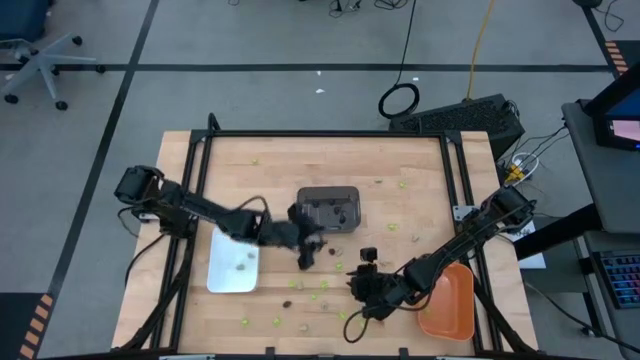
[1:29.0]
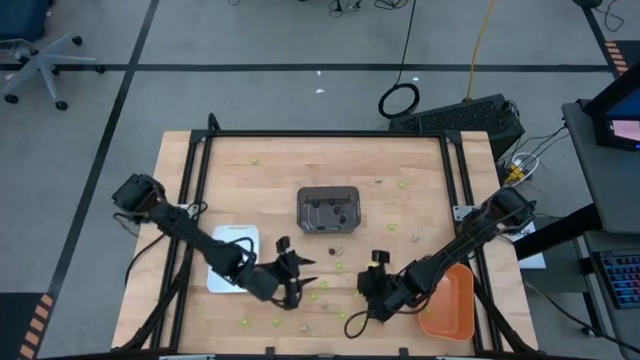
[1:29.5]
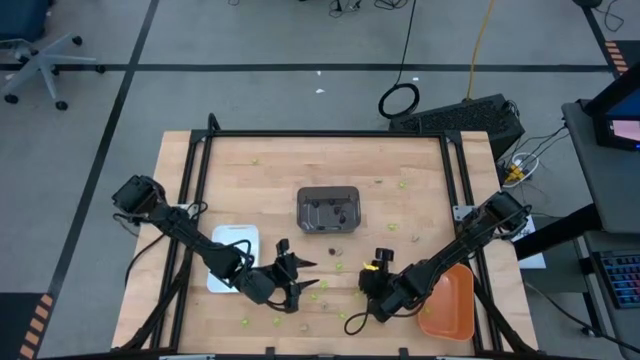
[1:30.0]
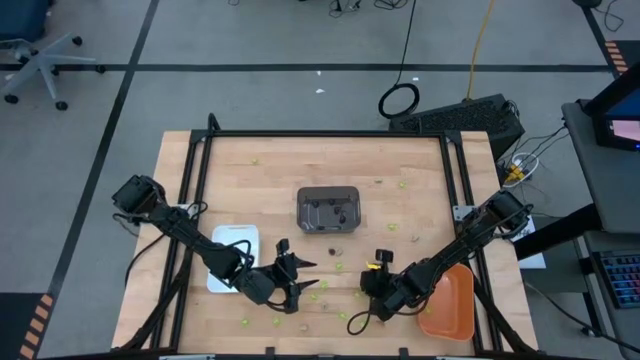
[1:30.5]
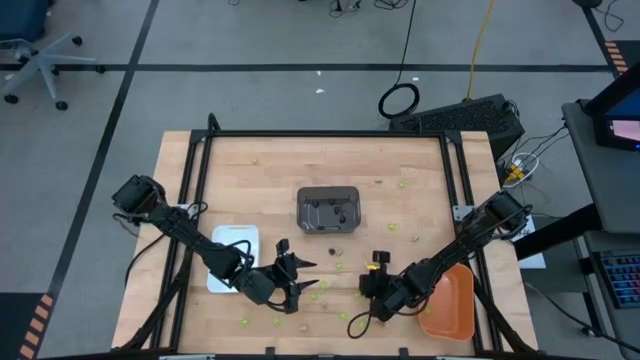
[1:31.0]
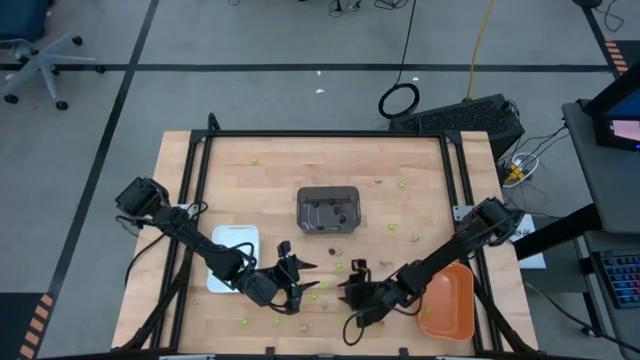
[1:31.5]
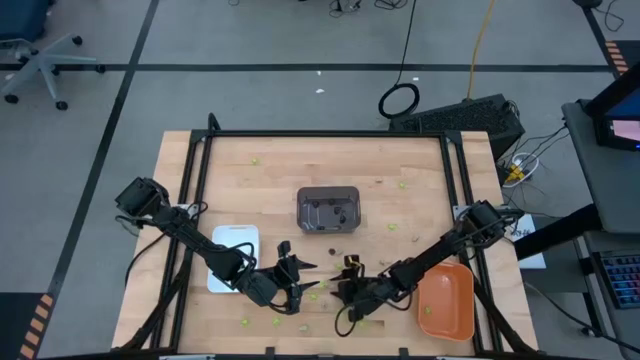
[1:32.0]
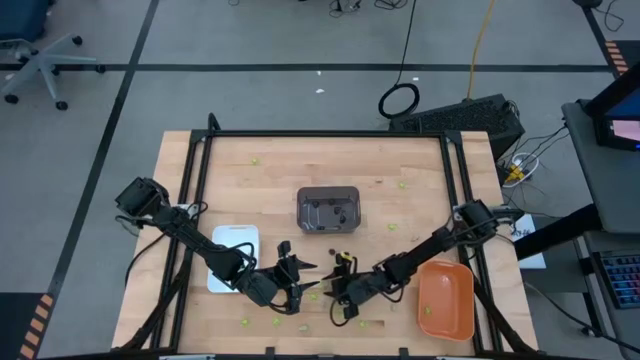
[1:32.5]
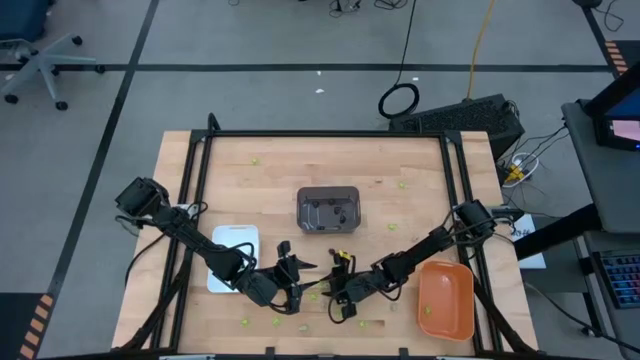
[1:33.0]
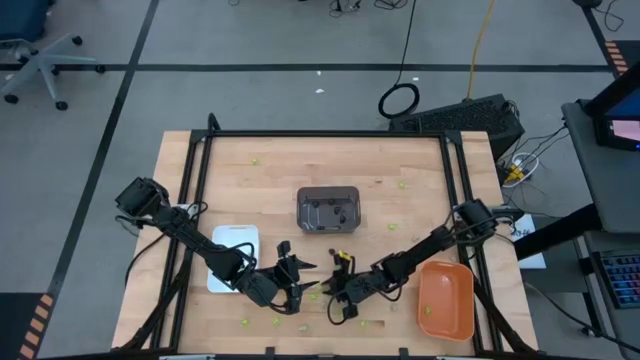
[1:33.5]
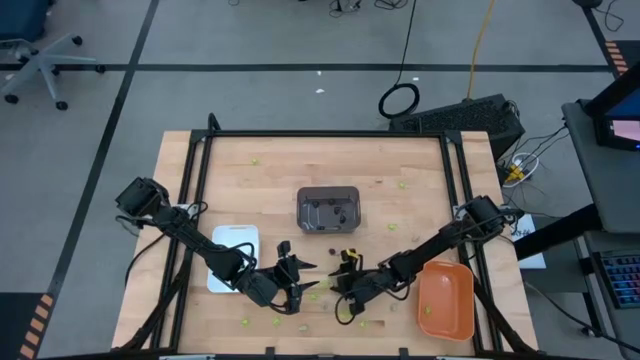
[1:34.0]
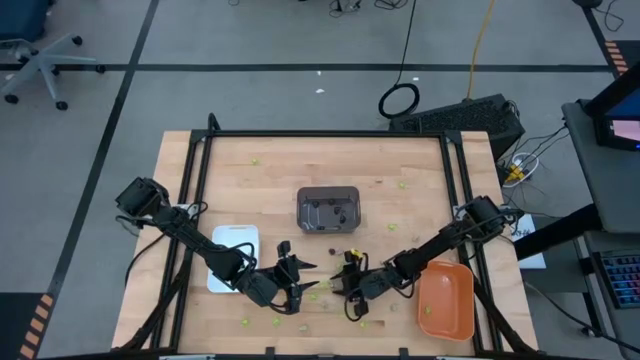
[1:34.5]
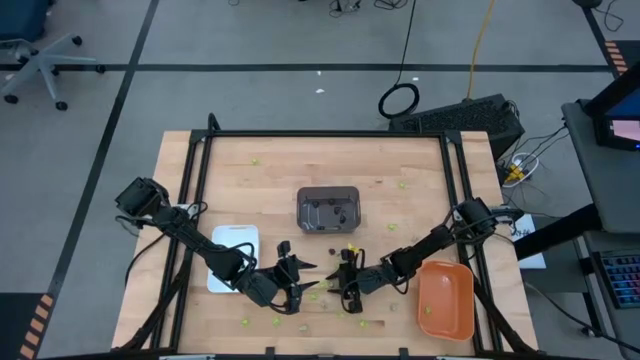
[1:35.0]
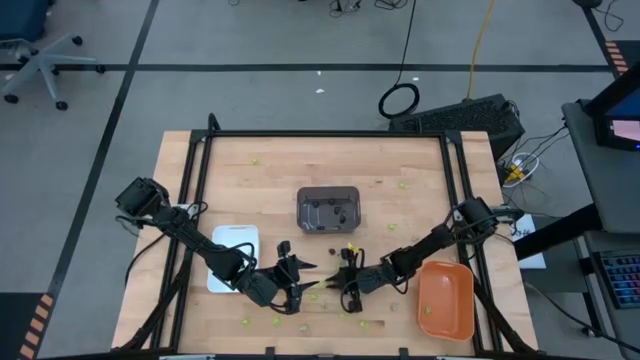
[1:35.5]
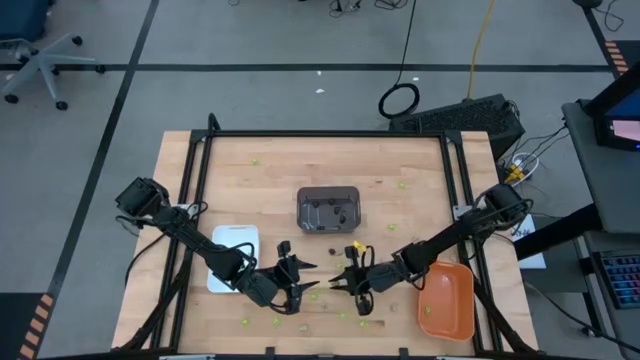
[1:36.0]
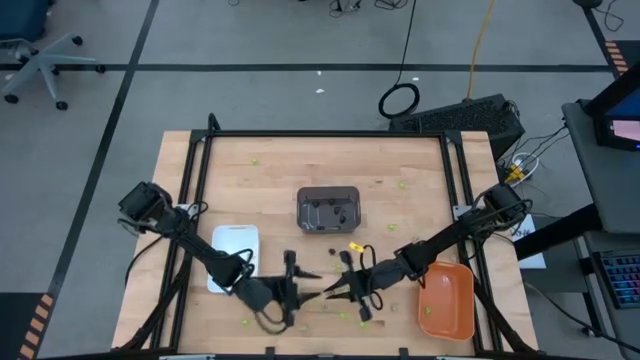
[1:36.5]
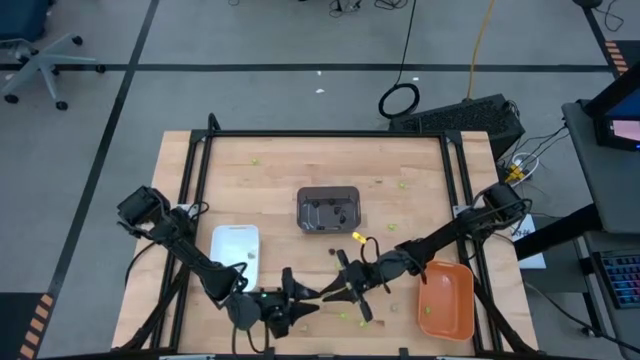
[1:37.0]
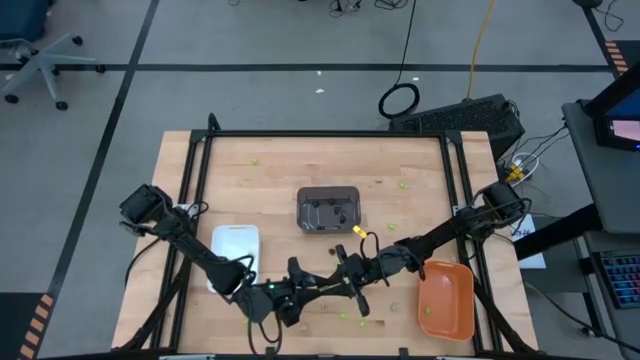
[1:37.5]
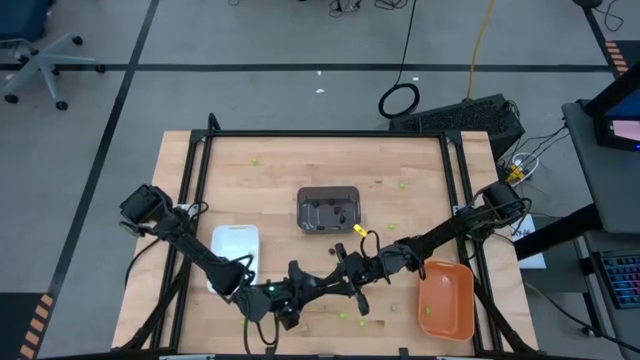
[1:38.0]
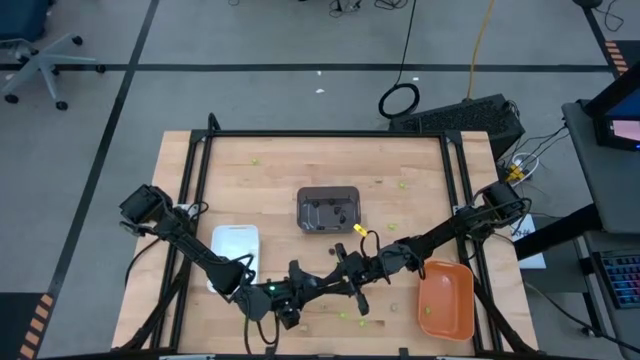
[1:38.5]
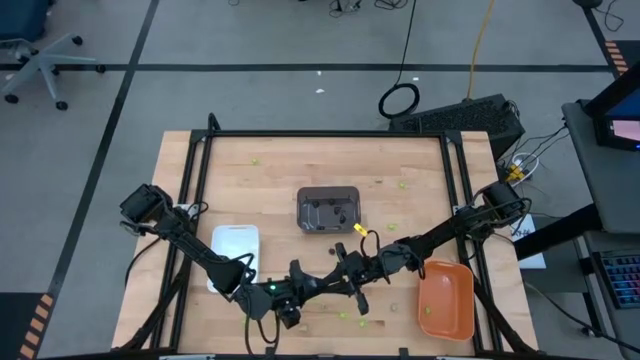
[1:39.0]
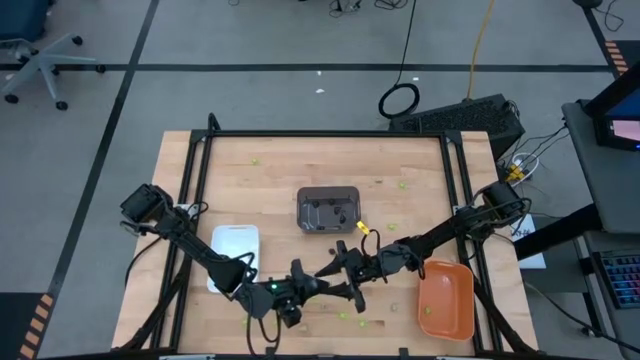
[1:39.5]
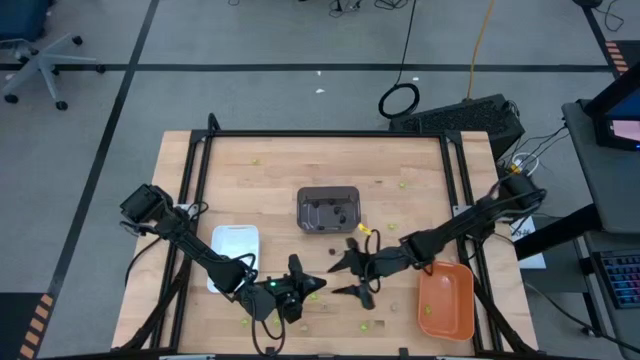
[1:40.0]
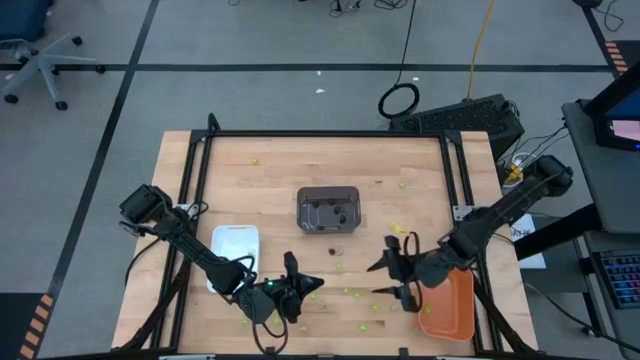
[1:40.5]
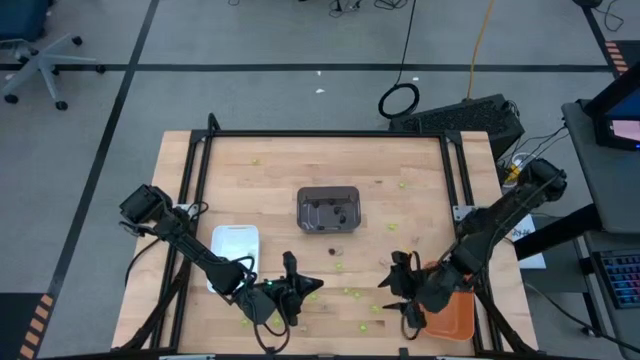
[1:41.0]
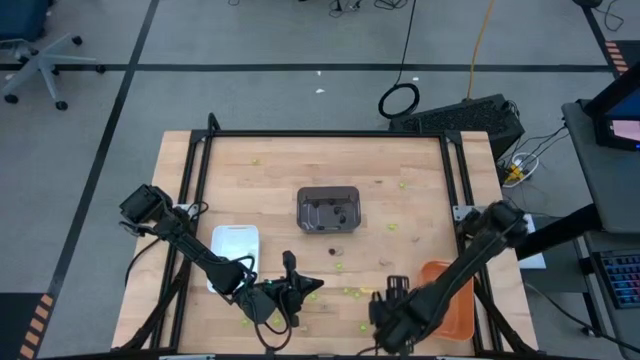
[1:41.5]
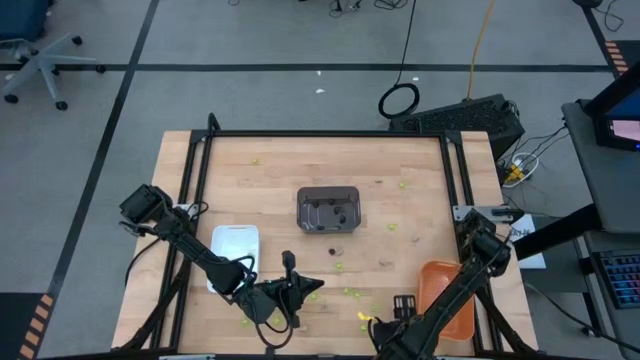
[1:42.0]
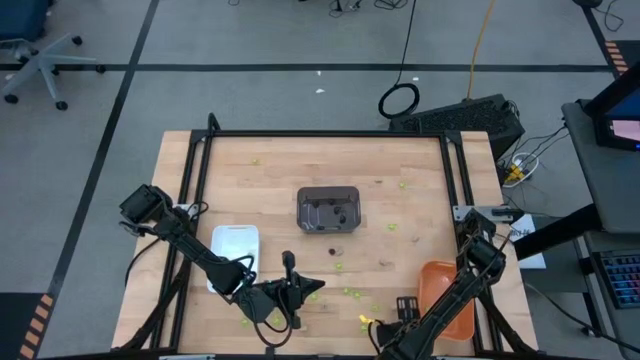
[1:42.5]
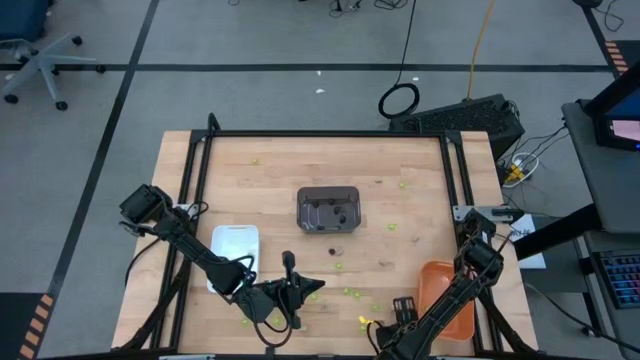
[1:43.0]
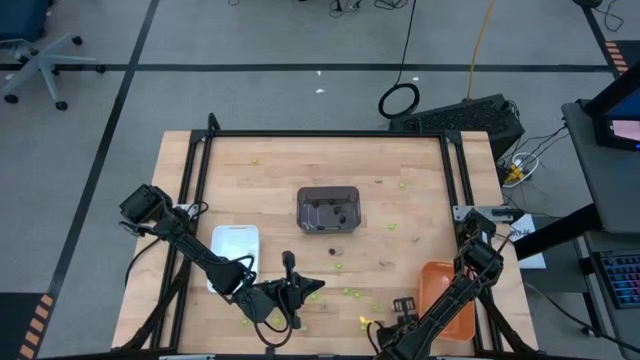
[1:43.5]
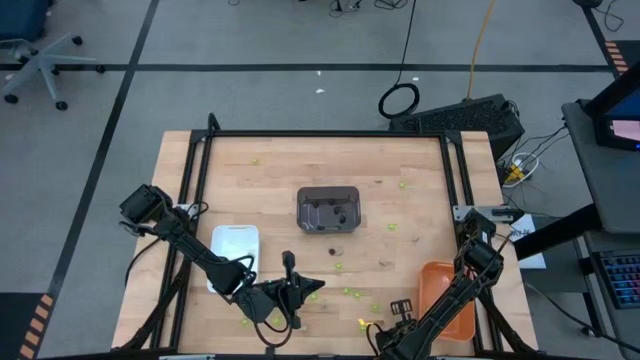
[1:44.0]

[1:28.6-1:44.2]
Task: Sort Halloween decoration
Put the white skull toy into the white bin

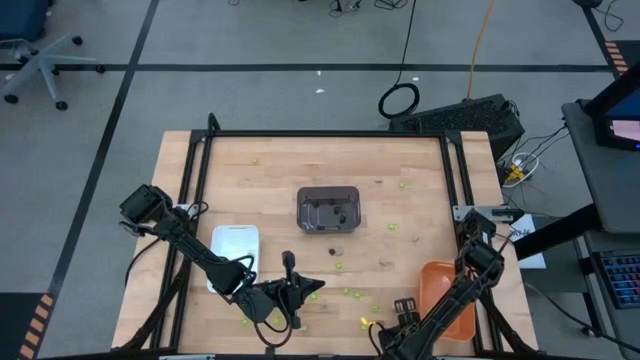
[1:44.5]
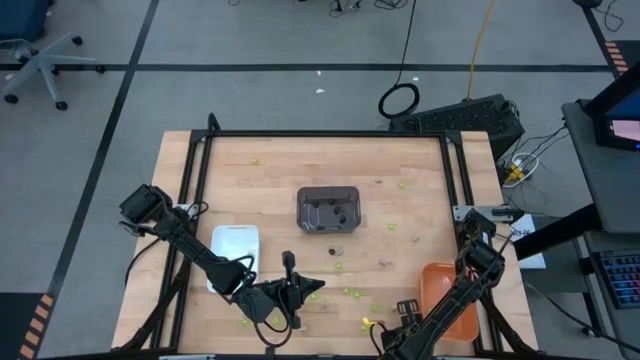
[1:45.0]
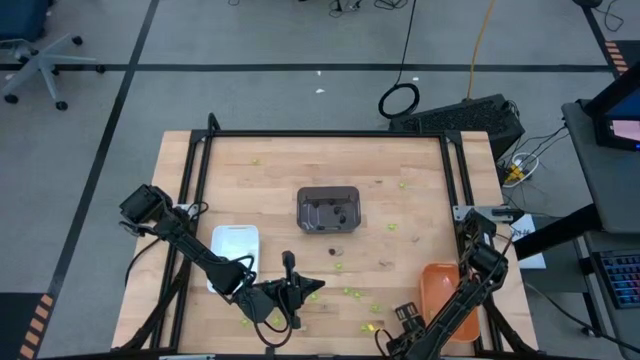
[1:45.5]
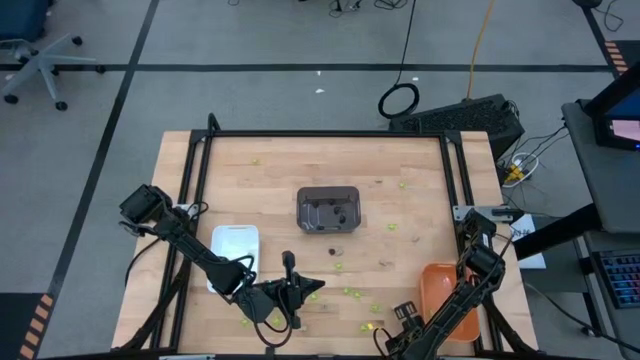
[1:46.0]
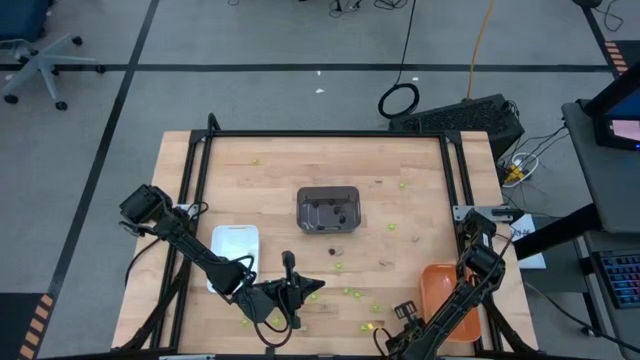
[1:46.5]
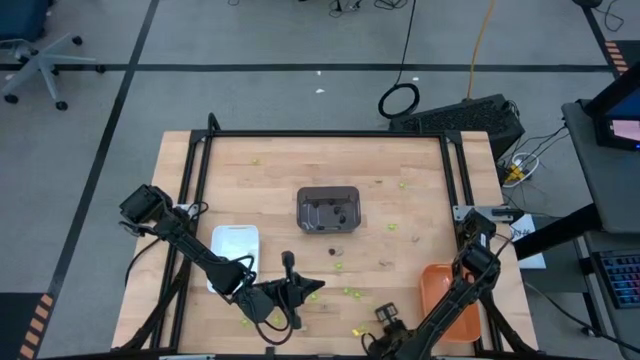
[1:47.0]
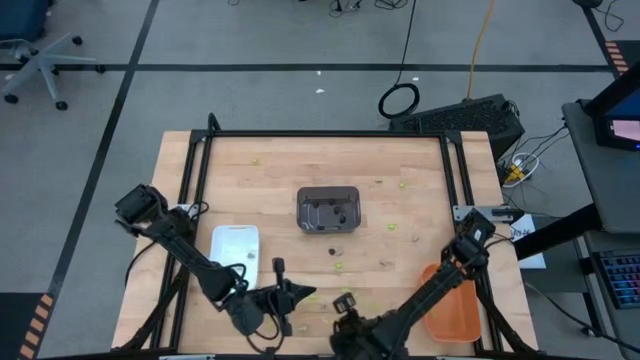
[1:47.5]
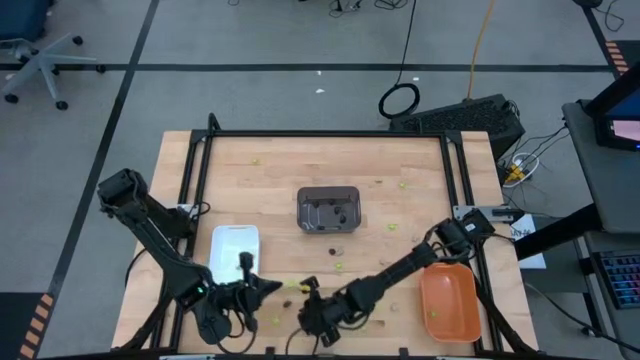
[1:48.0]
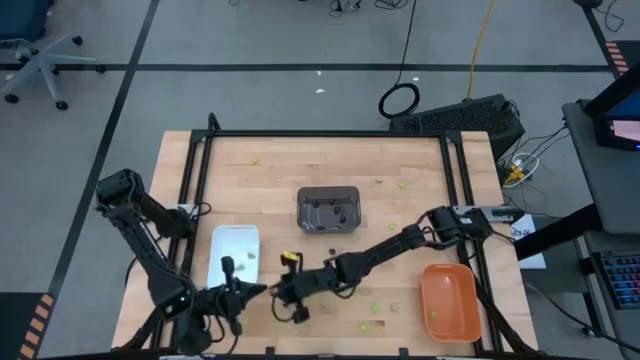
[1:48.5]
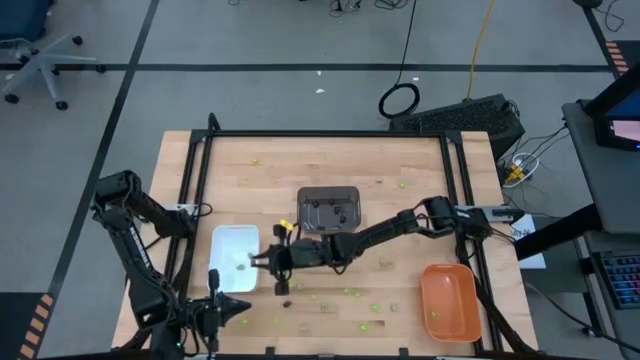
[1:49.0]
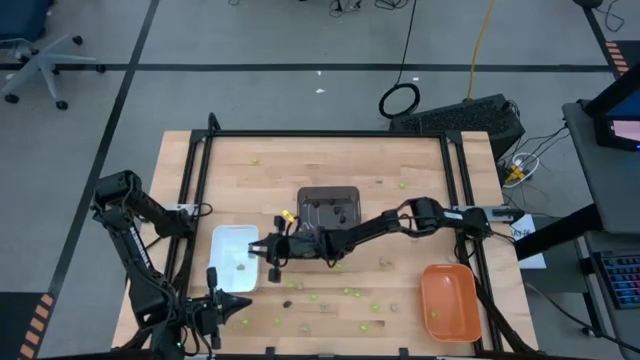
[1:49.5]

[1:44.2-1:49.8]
Put the white skull toy into the white bin
